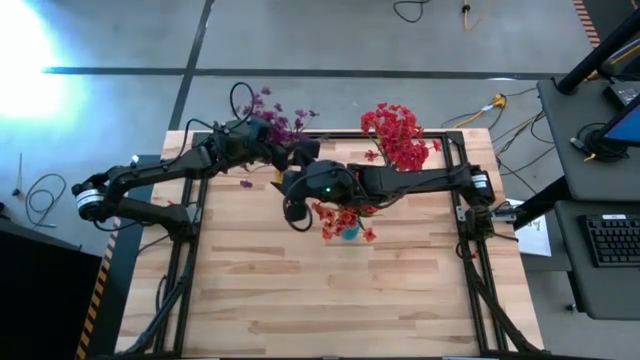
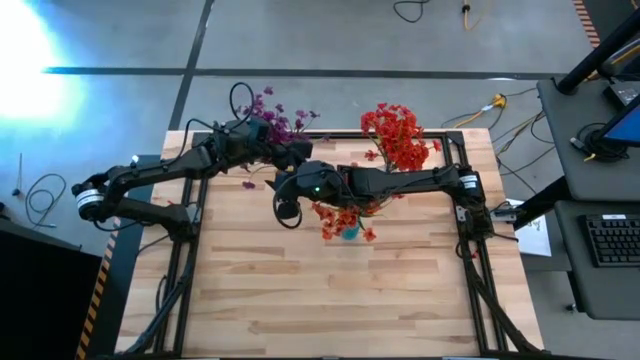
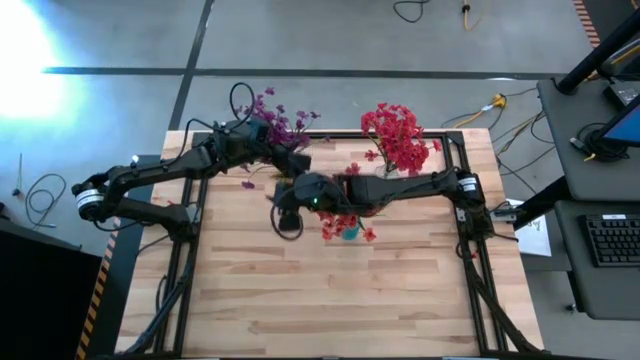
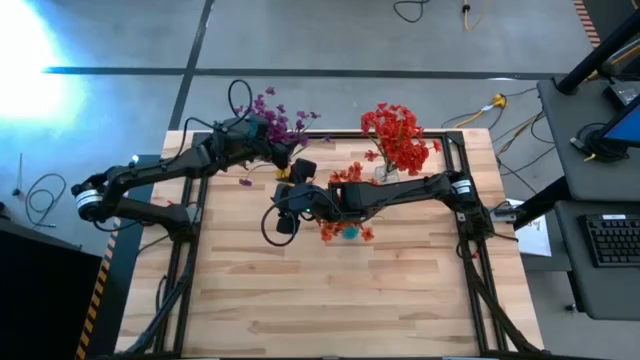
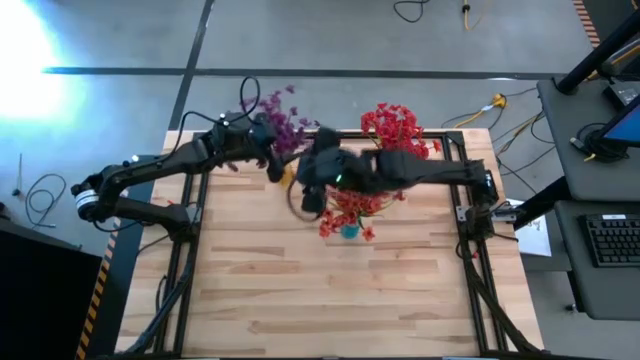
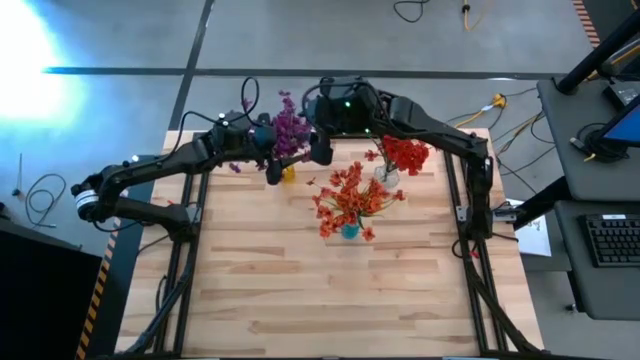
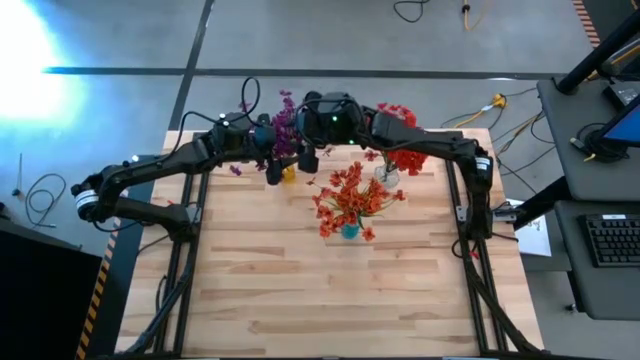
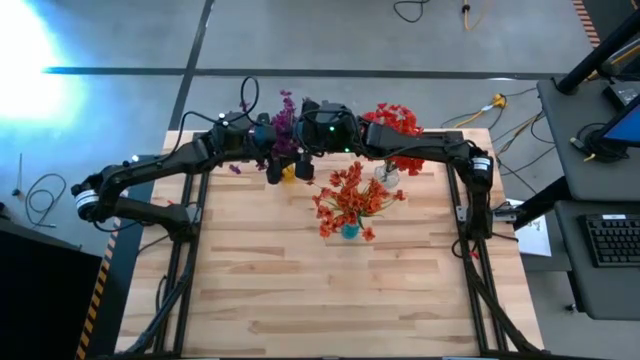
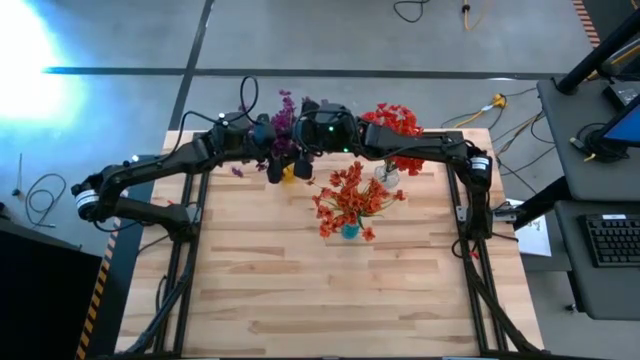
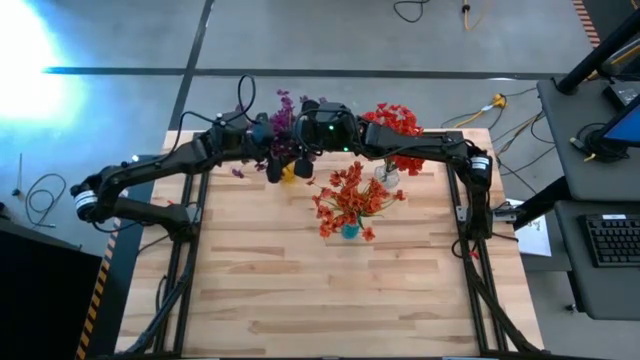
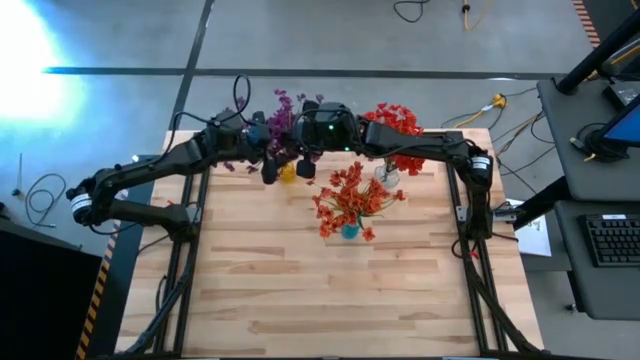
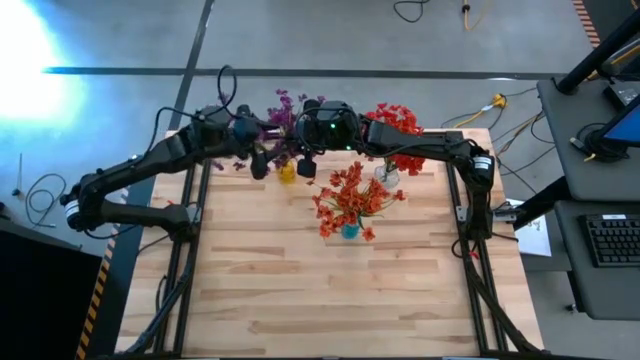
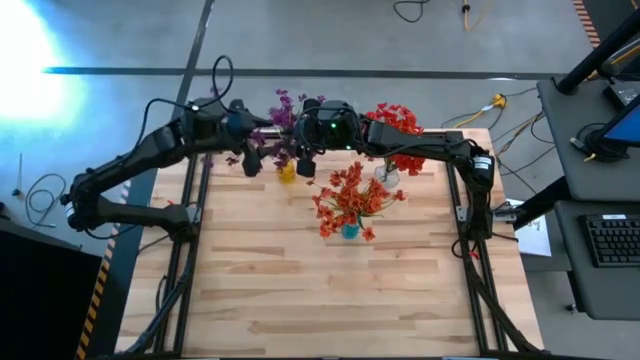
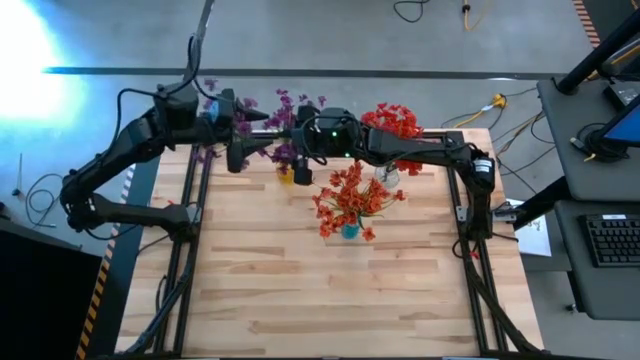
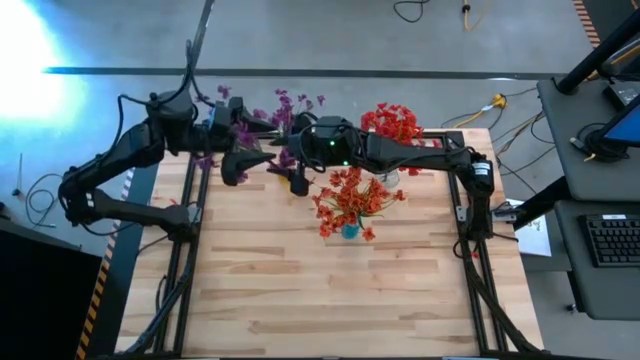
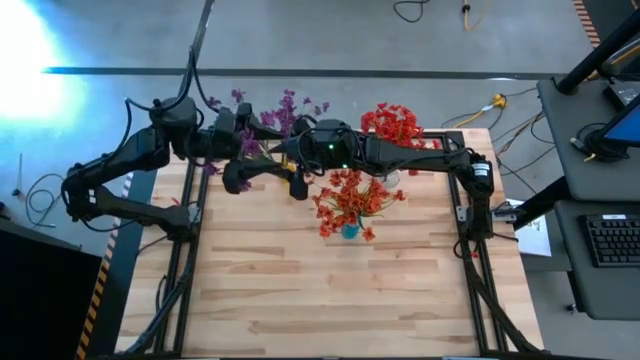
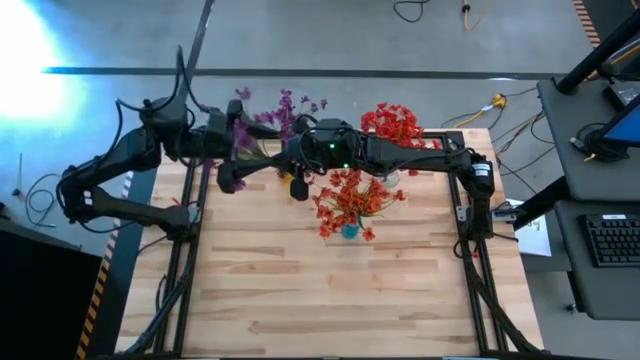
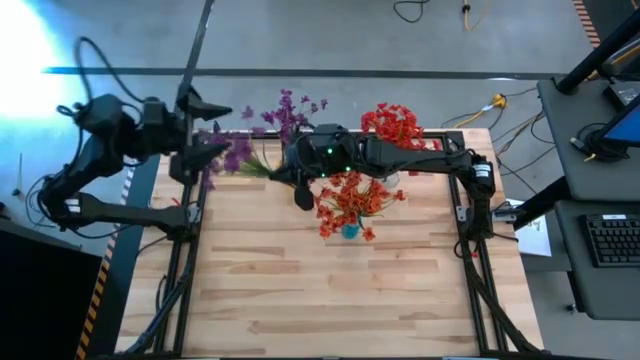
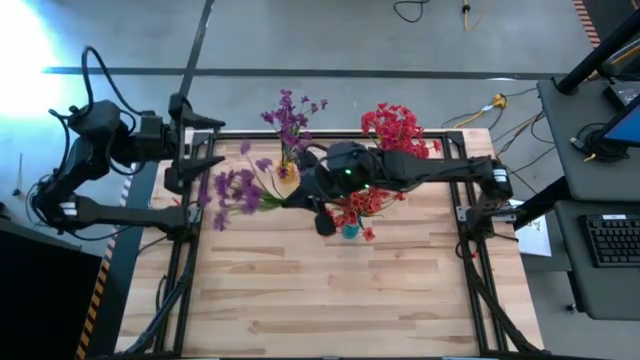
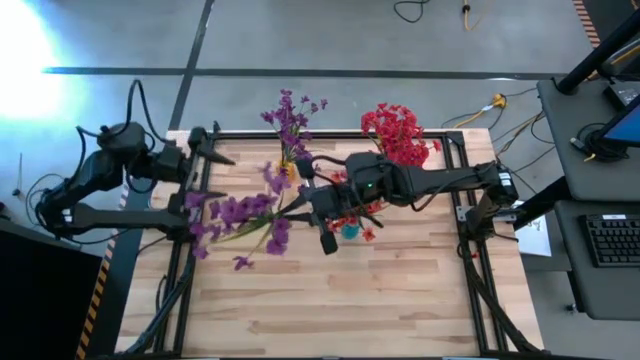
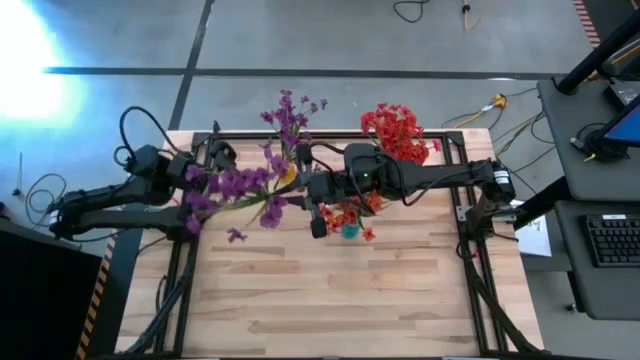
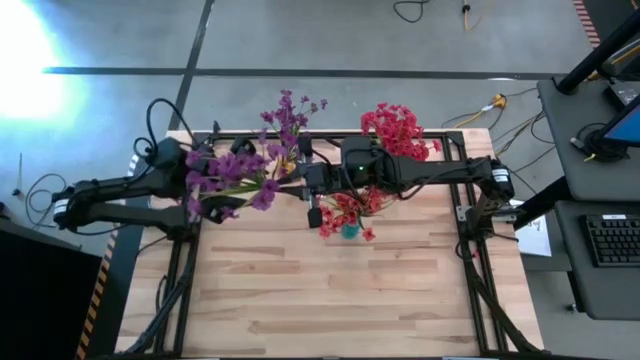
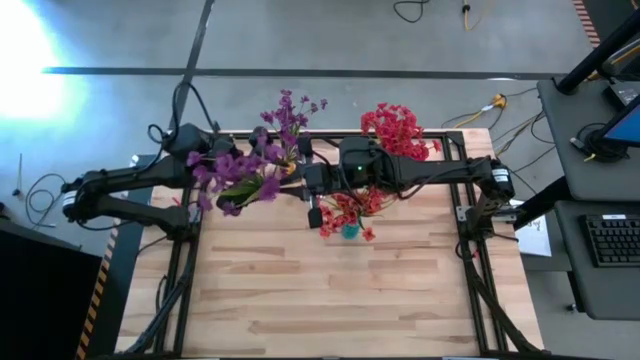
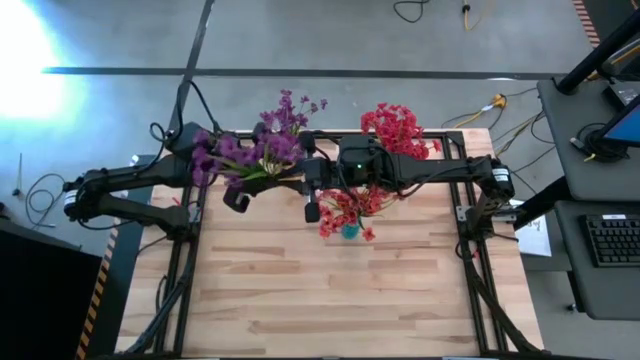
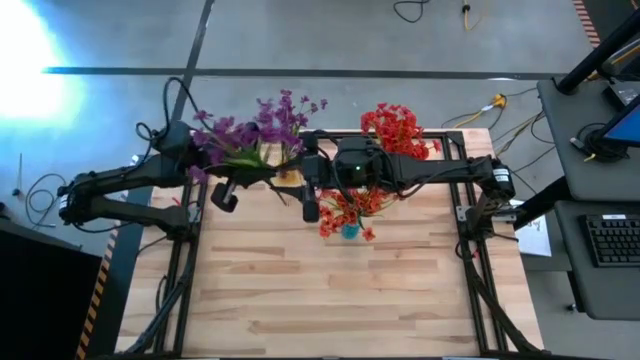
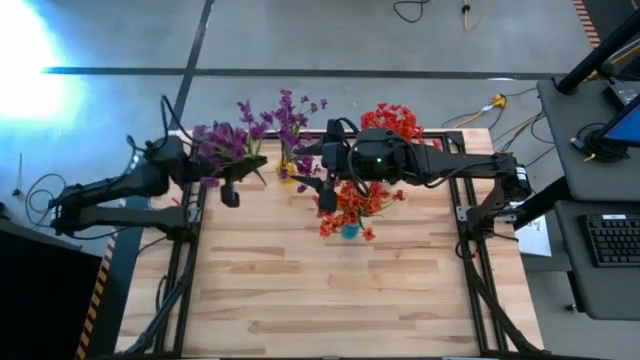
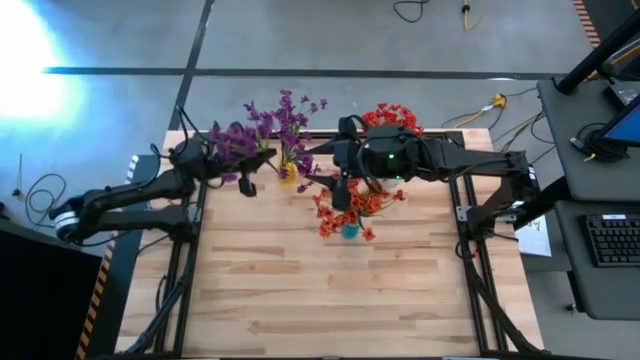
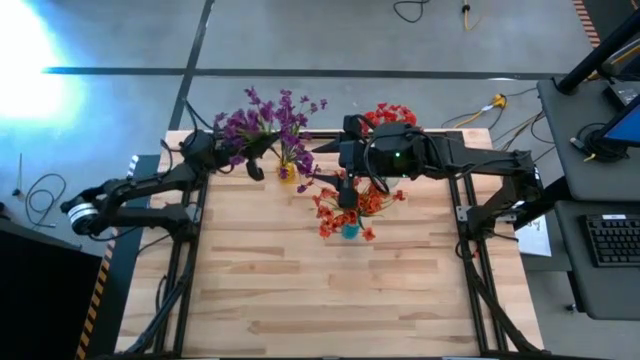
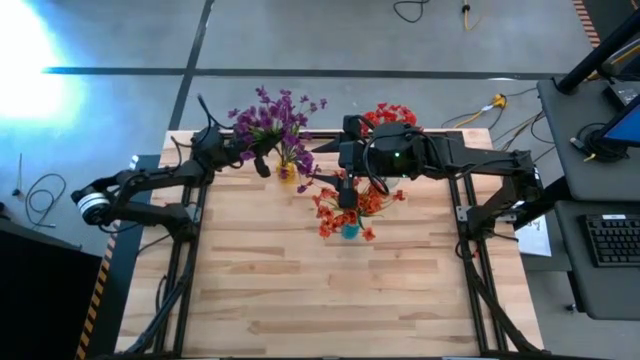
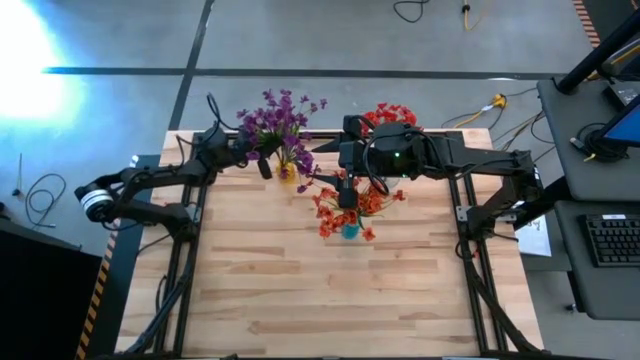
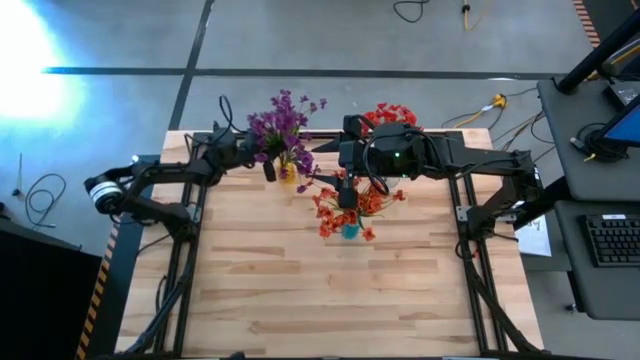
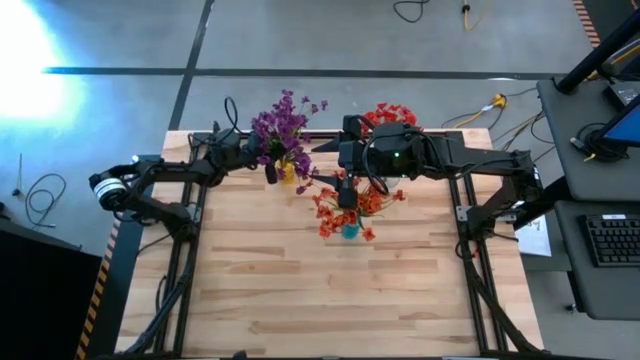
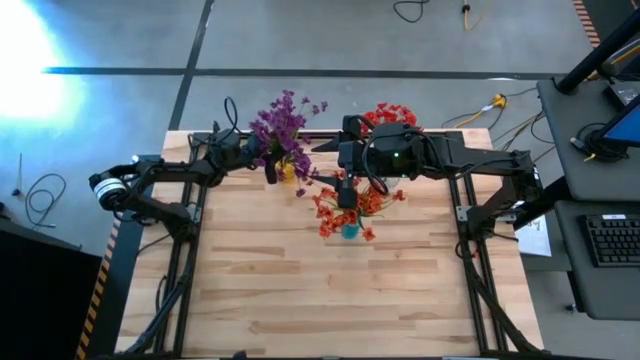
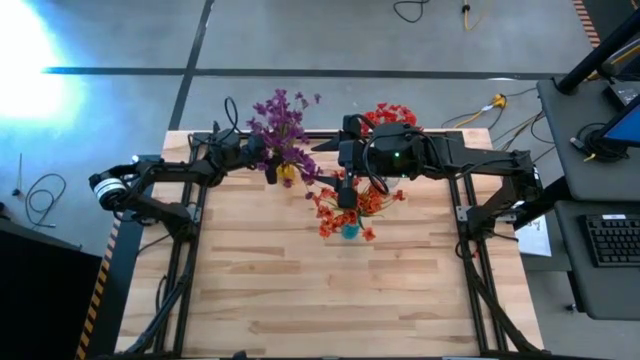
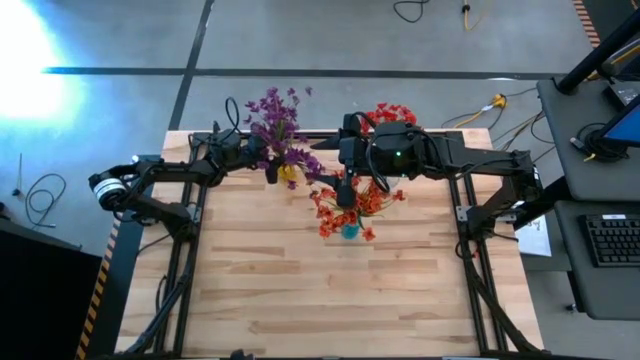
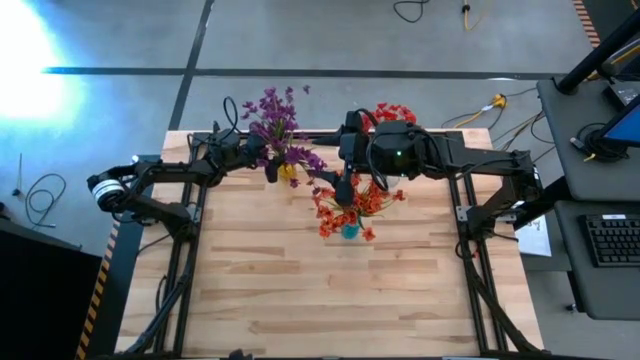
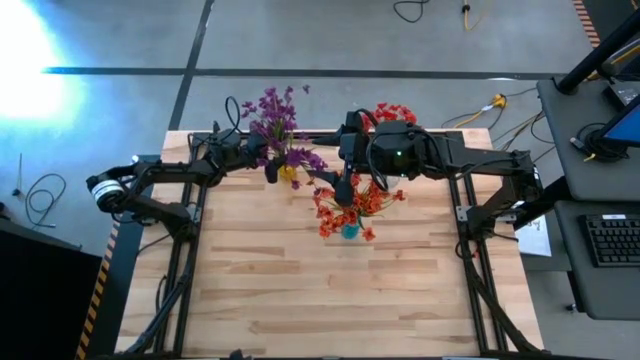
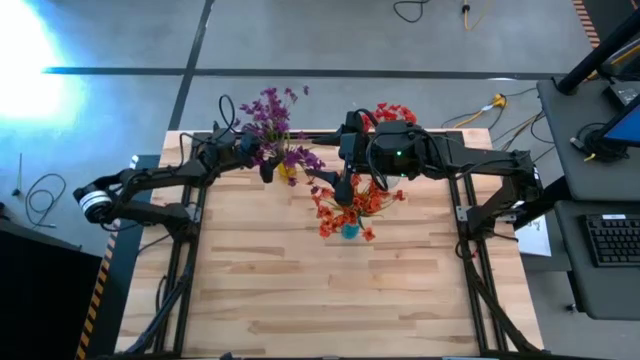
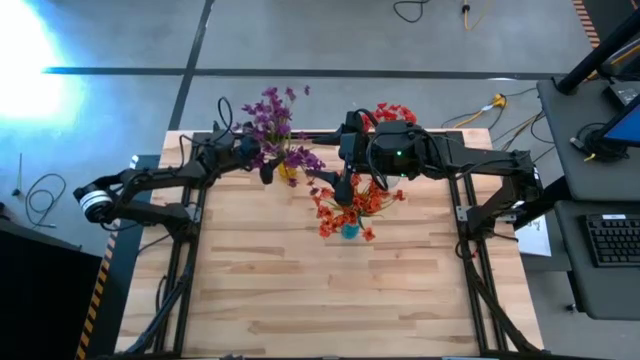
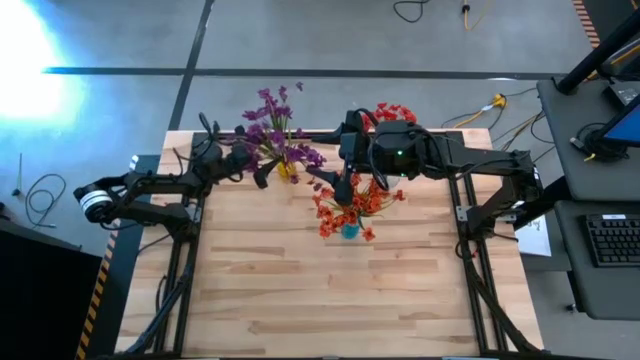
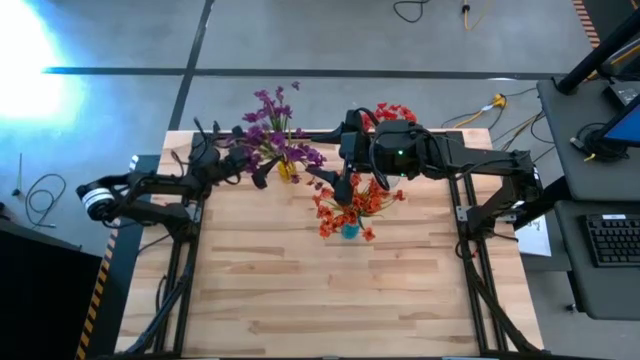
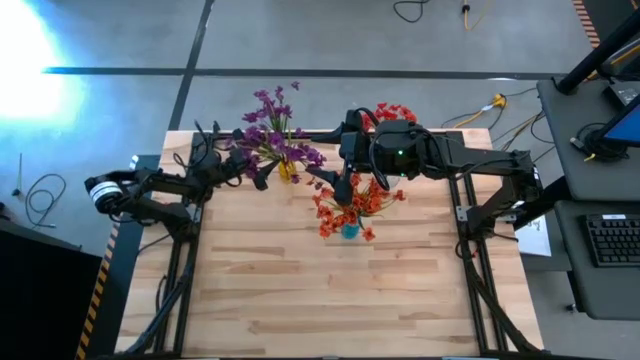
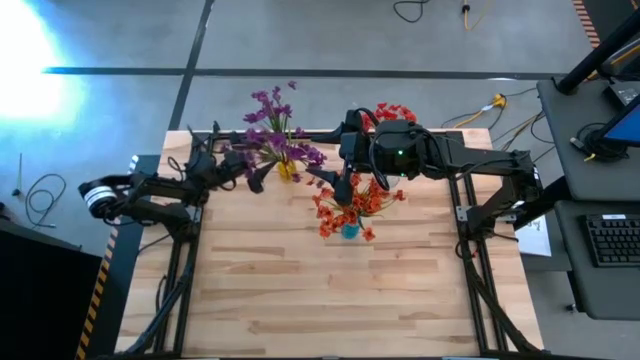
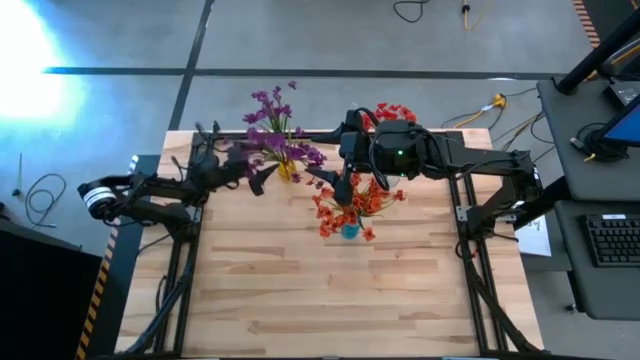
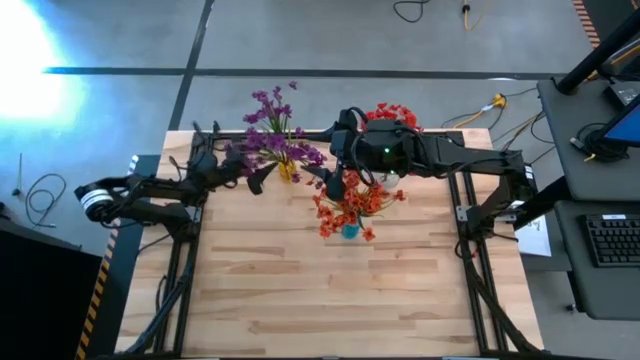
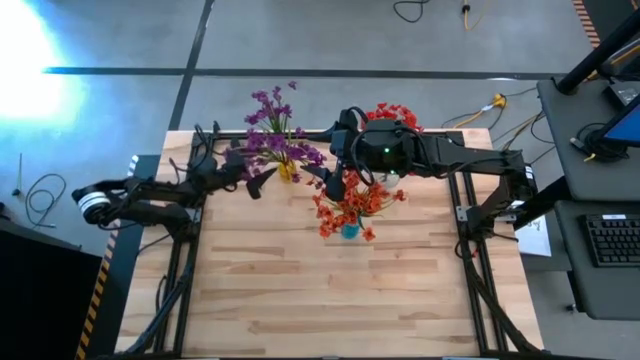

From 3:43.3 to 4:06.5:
Task: Sort flowers into vase by color
Put the violet flowers into the yellow vase
